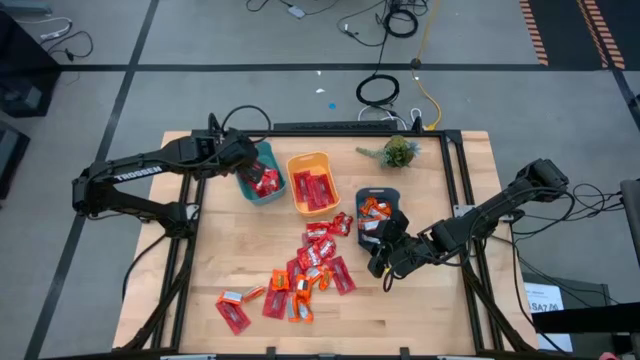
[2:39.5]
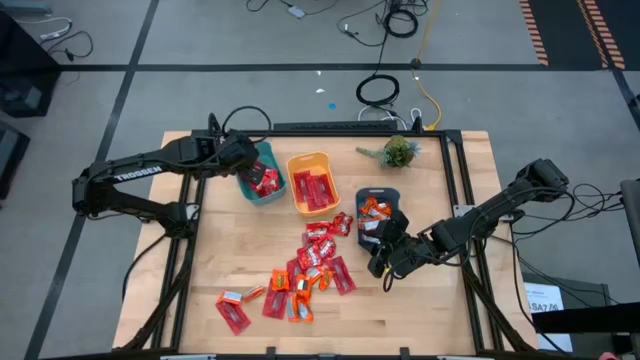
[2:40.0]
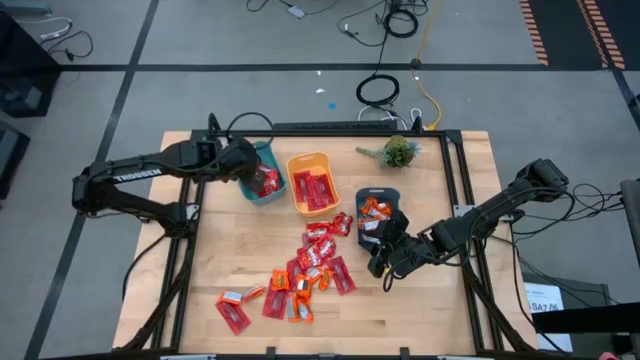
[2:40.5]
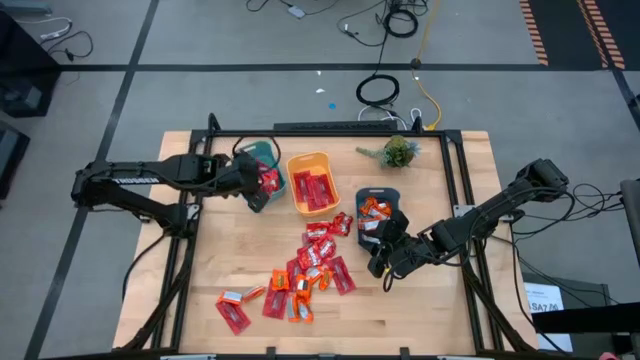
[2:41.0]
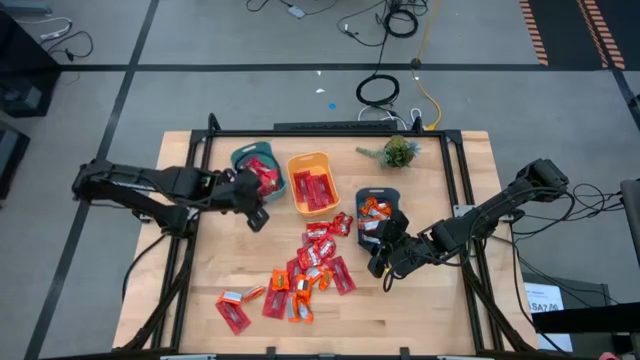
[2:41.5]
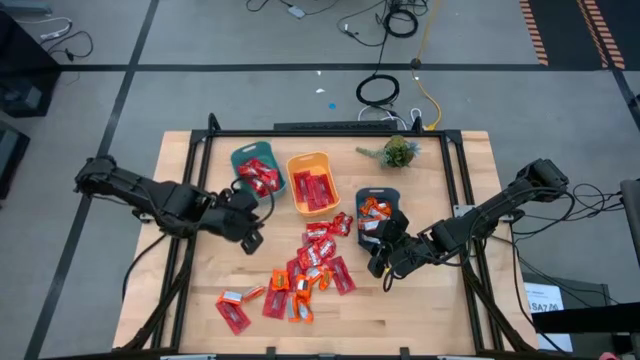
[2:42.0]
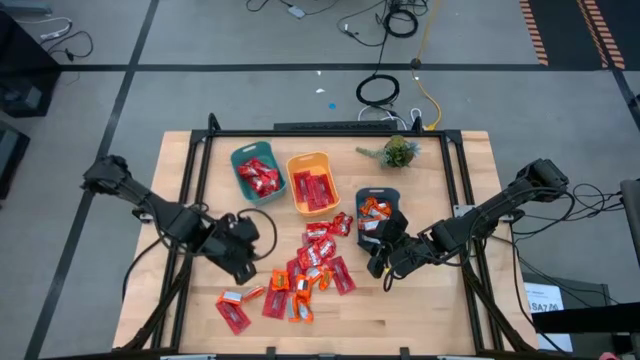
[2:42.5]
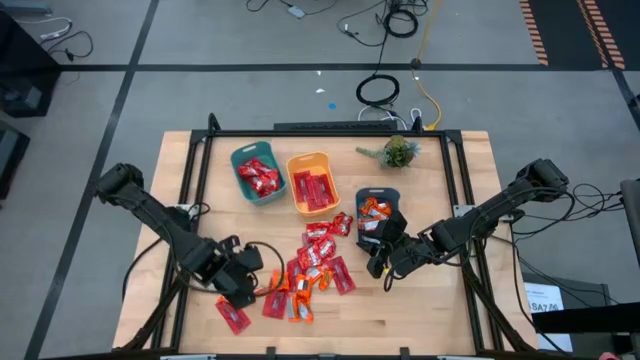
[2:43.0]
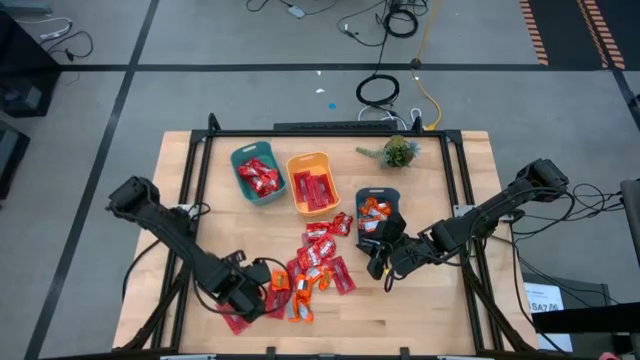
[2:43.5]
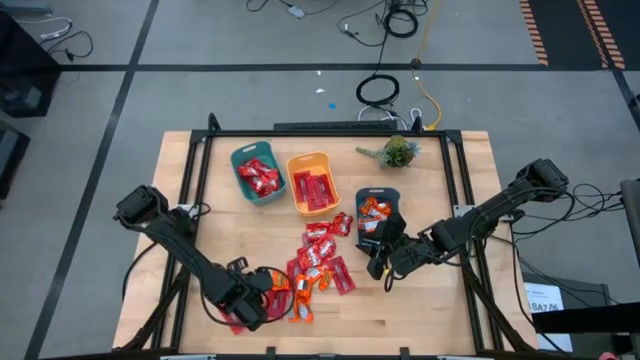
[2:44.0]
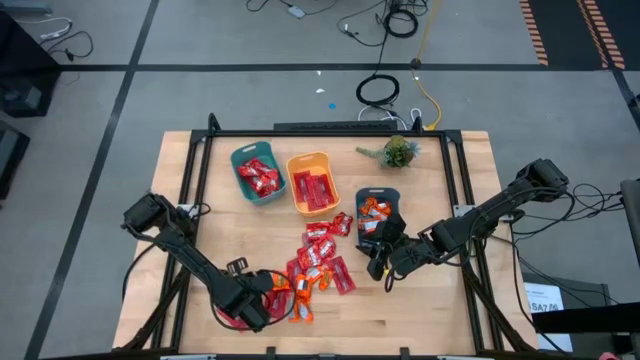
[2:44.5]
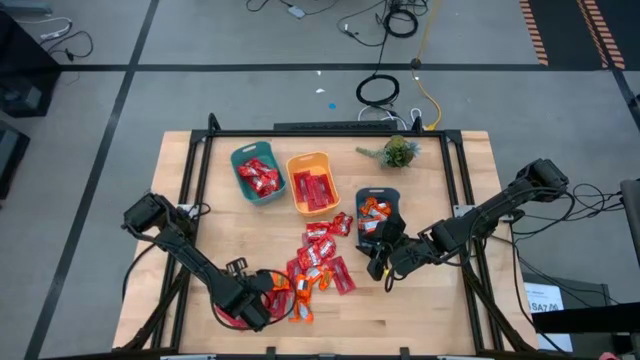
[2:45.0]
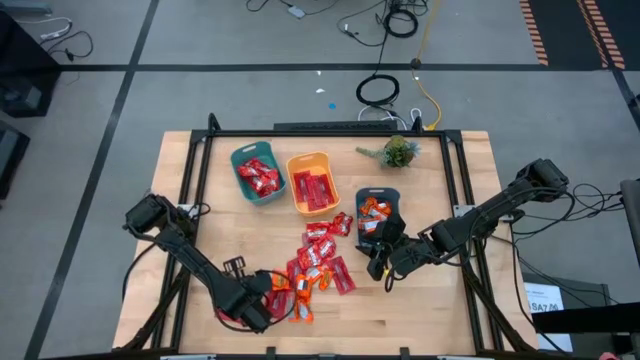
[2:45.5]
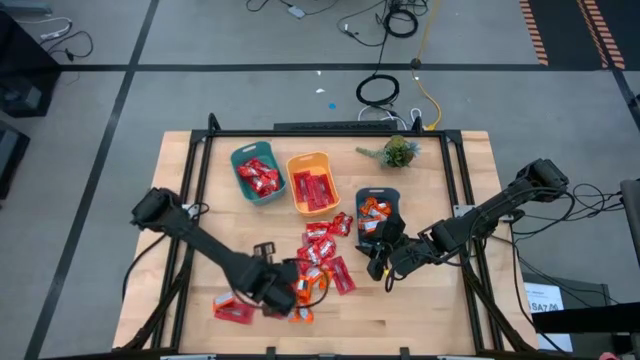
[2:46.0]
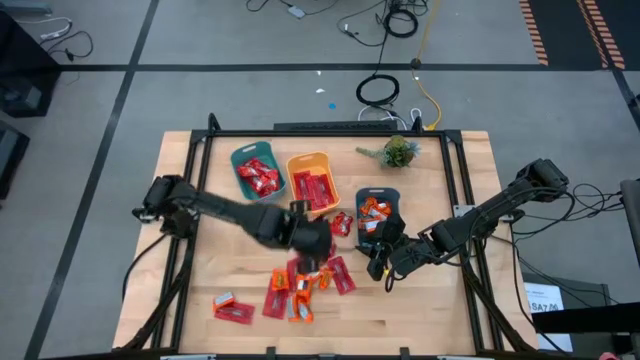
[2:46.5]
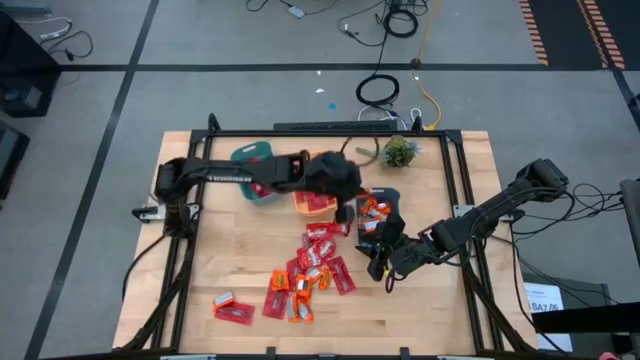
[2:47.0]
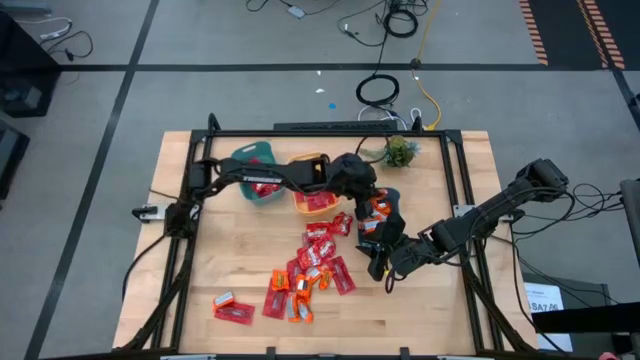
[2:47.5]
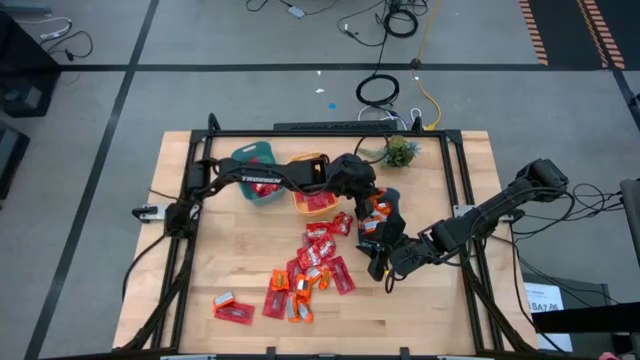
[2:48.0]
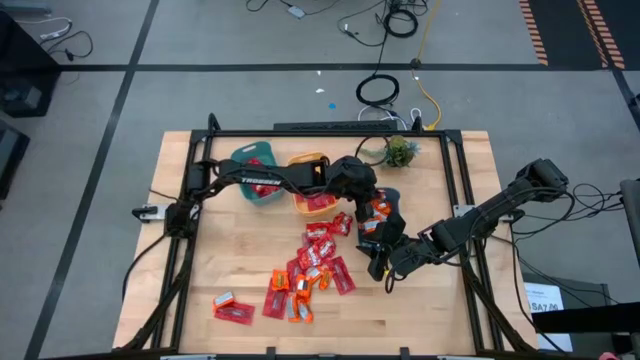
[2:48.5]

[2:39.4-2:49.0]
Task: Sort candy
Put the orange wrapper chocolate into the dark blue bin

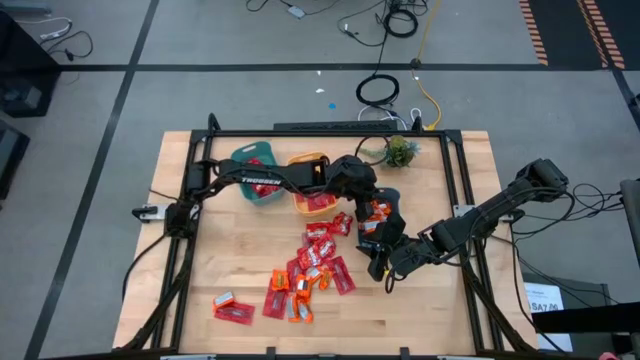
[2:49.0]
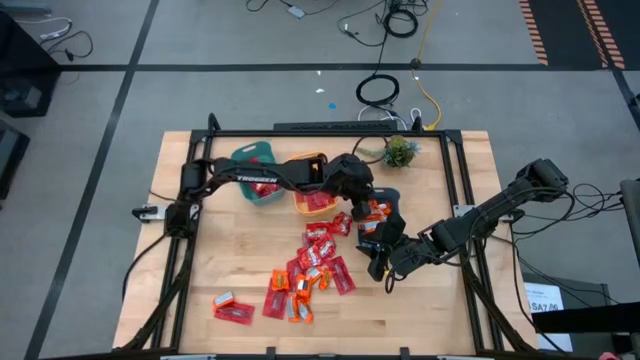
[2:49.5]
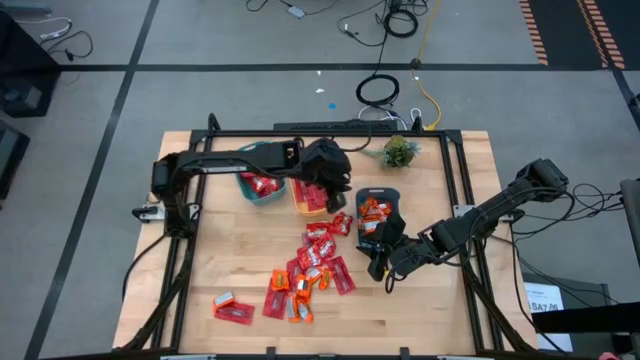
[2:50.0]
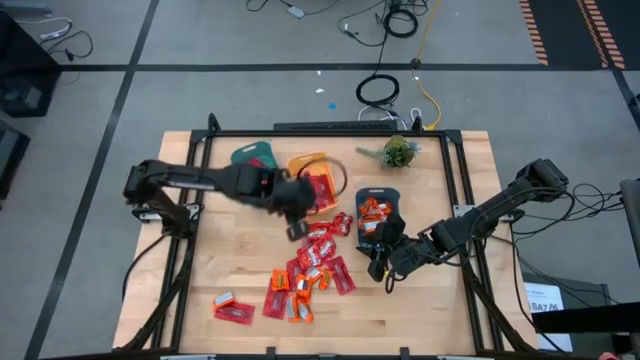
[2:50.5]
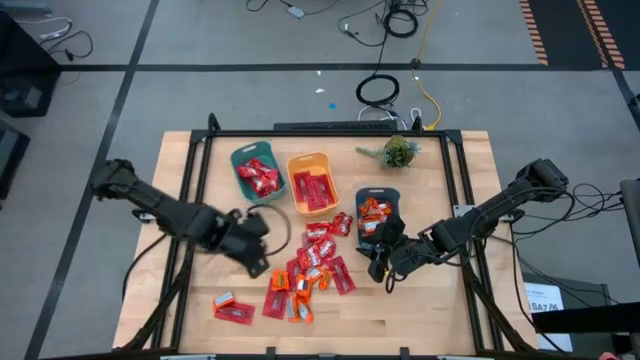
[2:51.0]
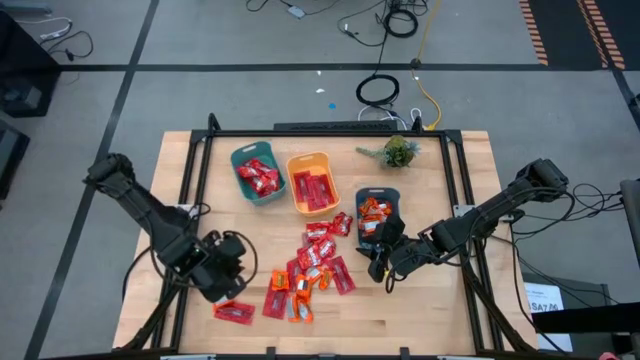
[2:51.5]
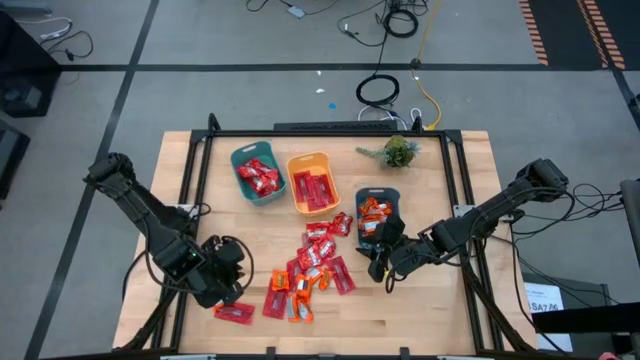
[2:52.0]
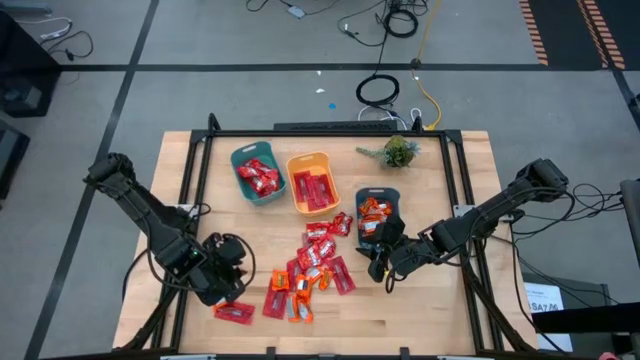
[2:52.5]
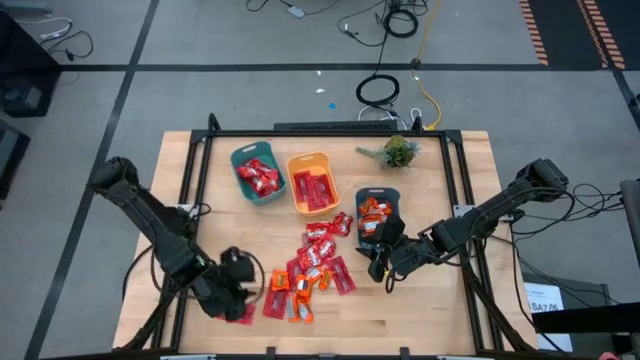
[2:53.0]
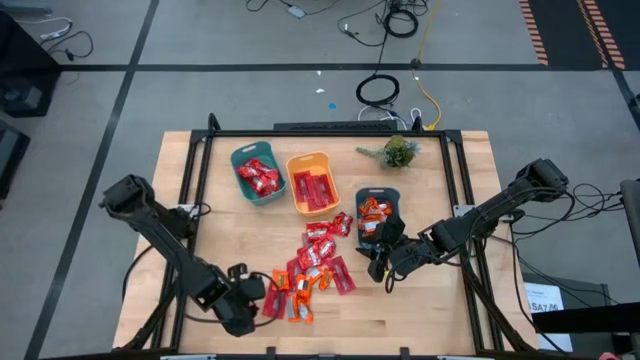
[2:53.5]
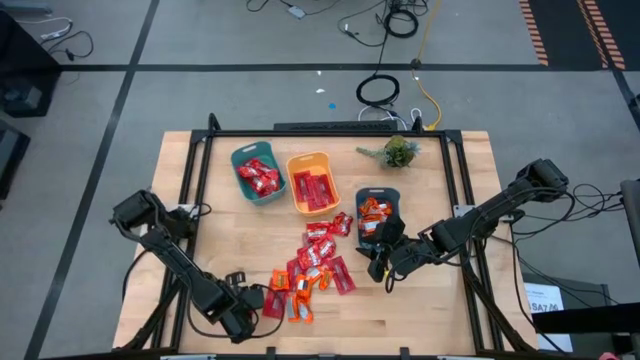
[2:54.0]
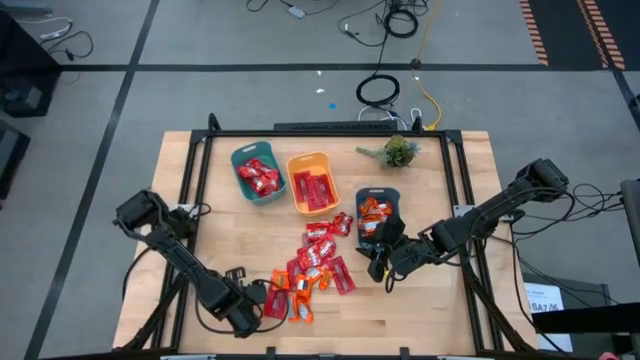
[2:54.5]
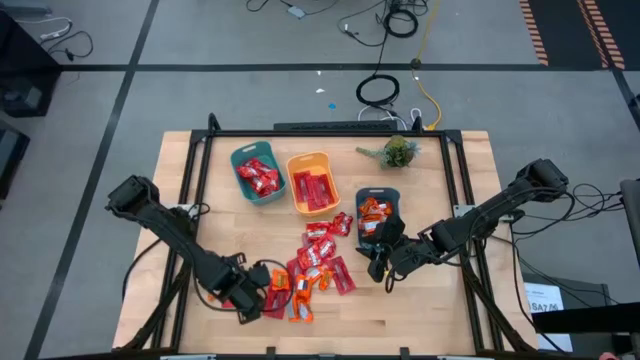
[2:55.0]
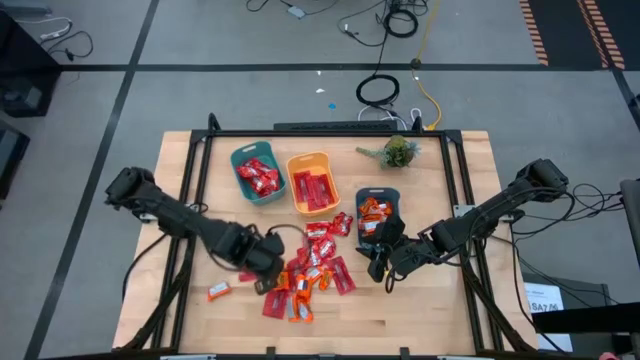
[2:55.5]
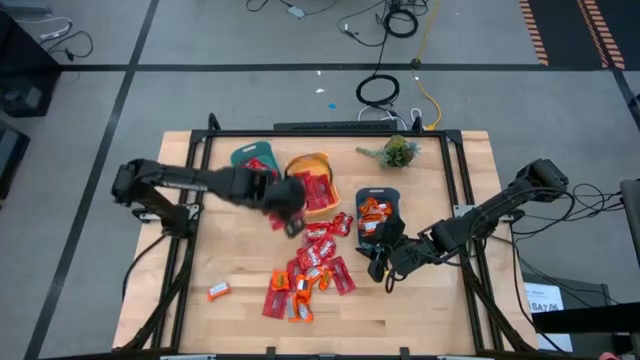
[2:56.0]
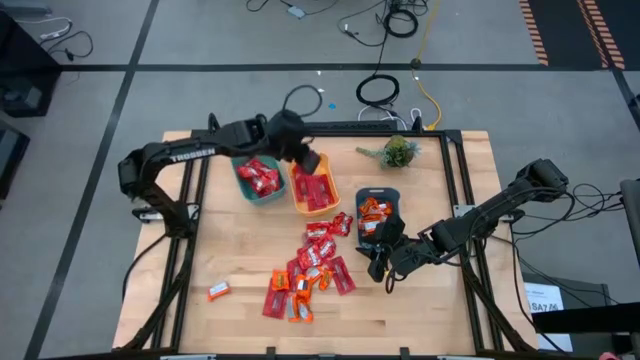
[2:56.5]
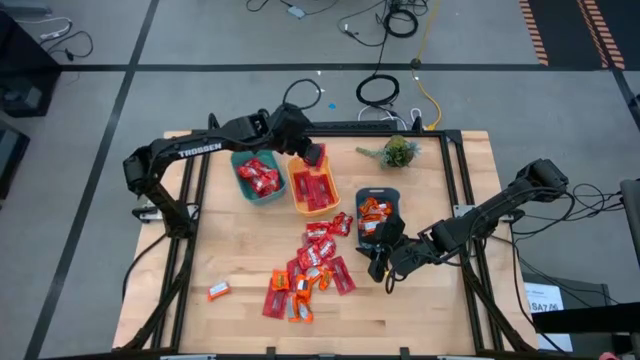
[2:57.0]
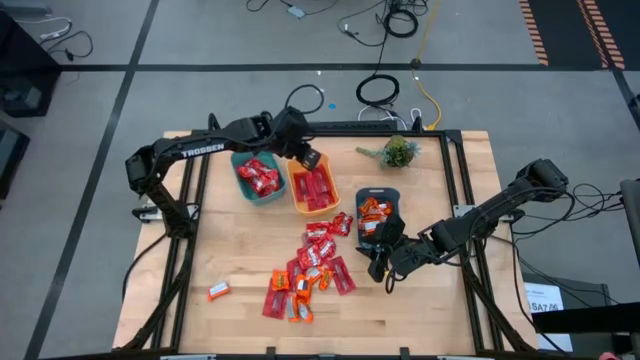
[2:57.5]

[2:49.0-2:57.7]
Put the red wrapper candy into the yellow bin

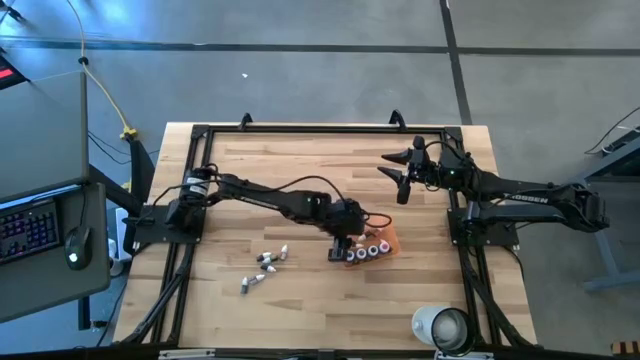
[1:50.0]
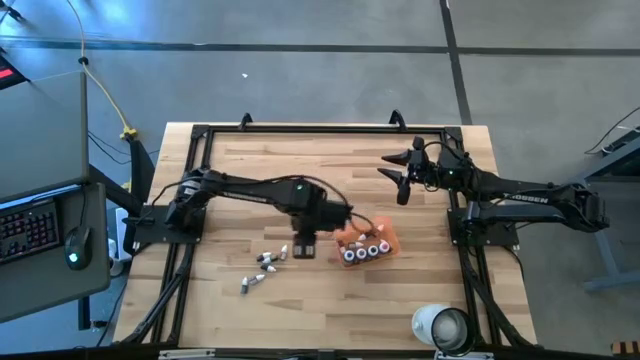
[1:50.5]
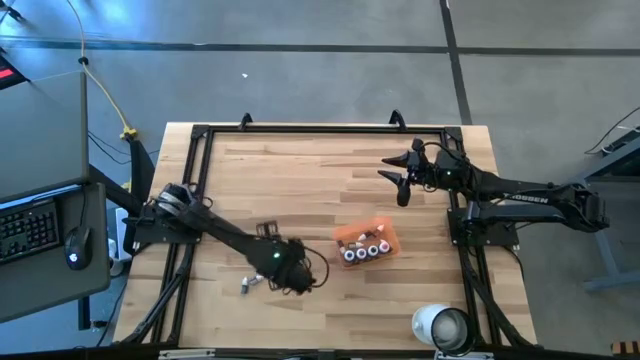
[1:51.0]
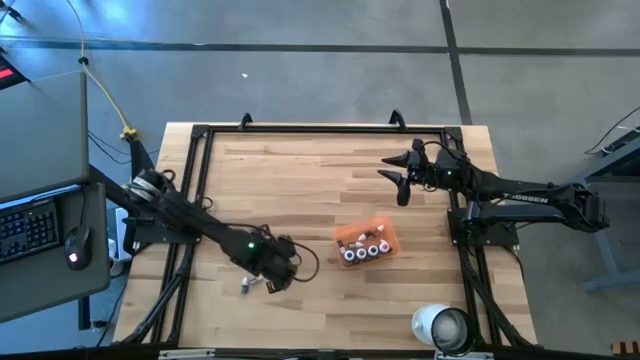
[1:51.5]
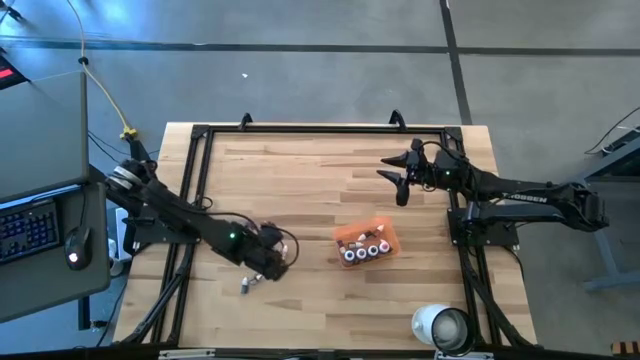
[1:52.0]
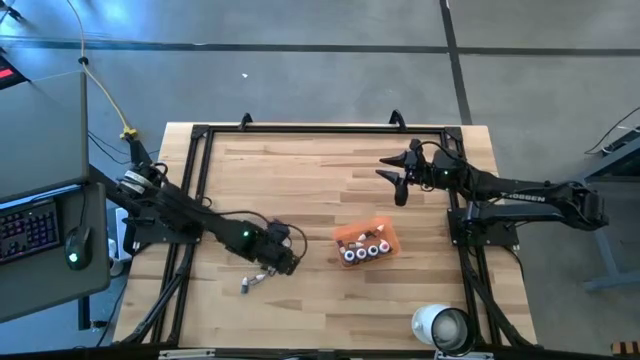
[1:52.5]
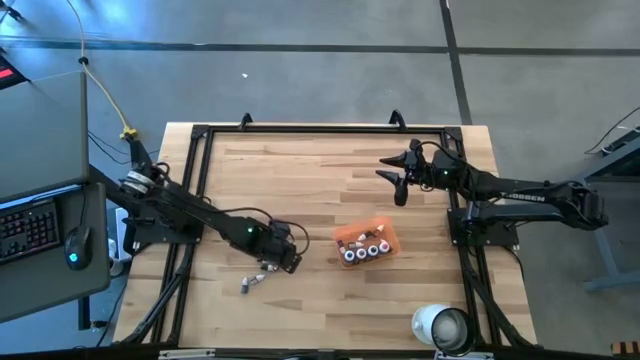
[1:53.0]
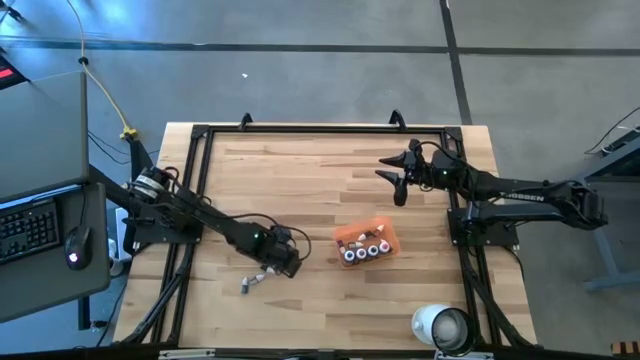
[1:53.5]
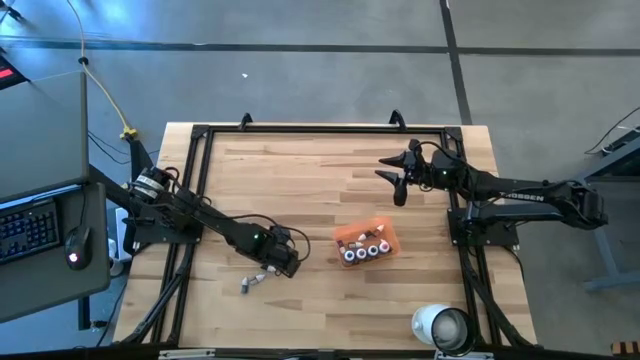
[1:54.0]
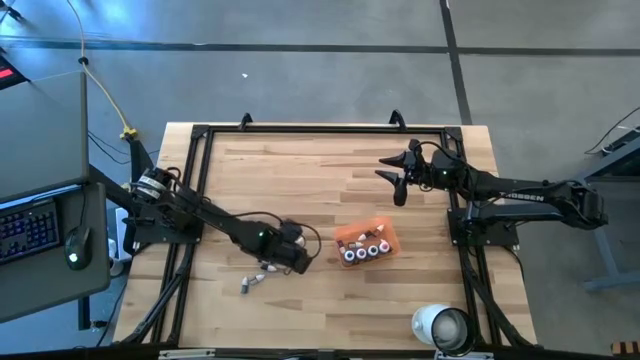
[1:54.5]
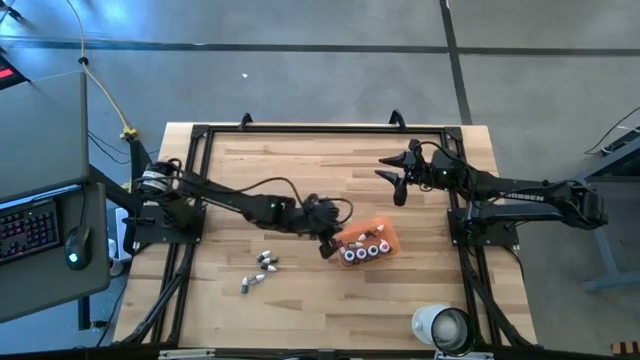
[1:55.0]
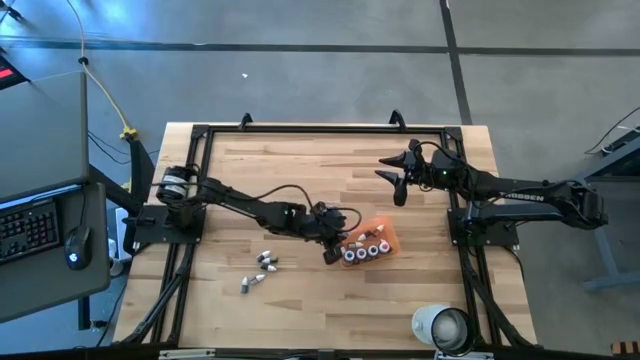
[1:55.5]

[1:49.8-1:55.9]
Task: Pick & Place food coloring
Put the small red food coloring bottle into the orange bin
